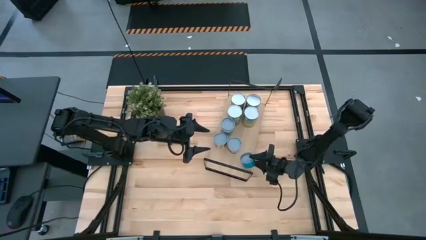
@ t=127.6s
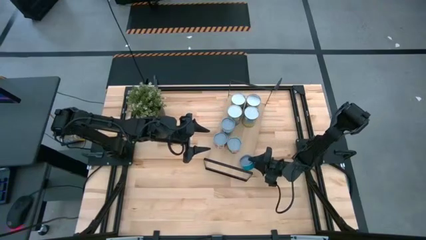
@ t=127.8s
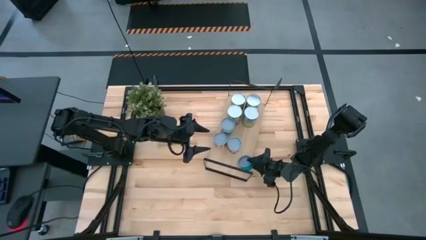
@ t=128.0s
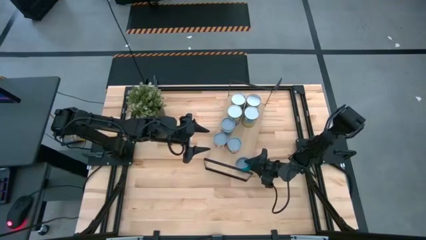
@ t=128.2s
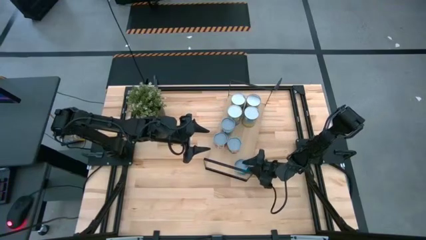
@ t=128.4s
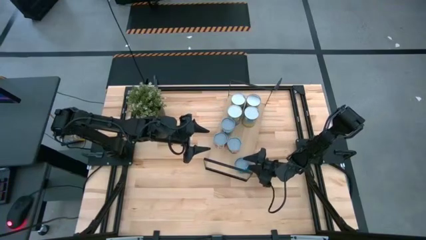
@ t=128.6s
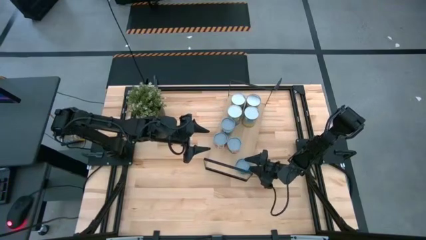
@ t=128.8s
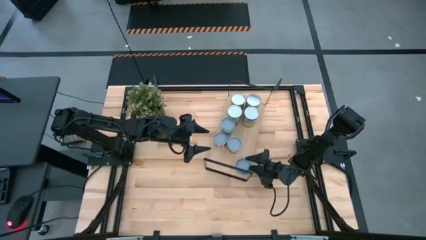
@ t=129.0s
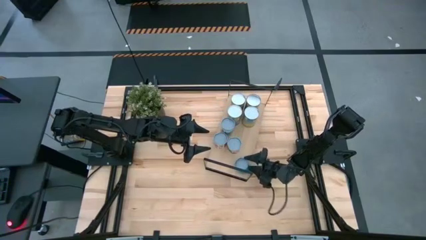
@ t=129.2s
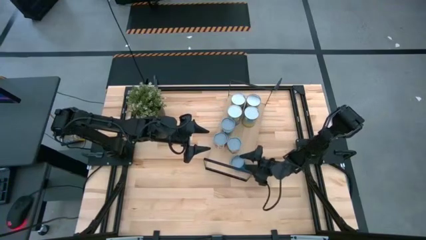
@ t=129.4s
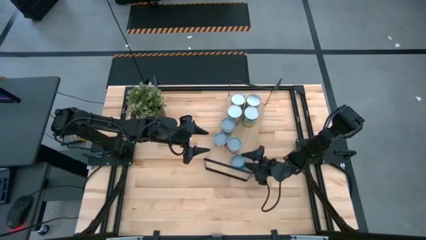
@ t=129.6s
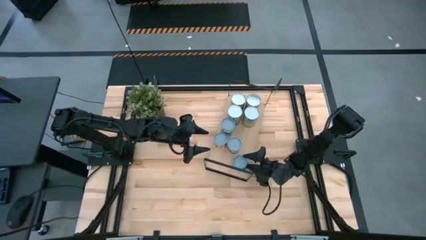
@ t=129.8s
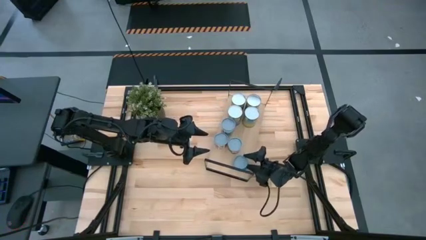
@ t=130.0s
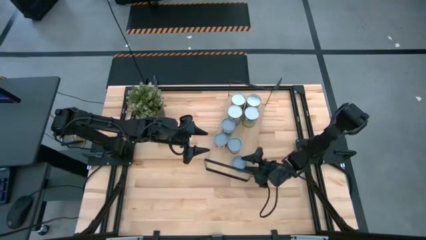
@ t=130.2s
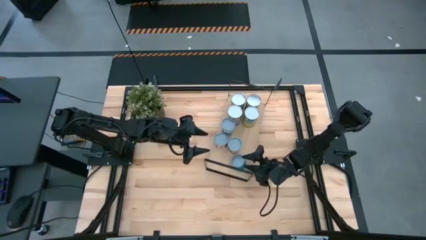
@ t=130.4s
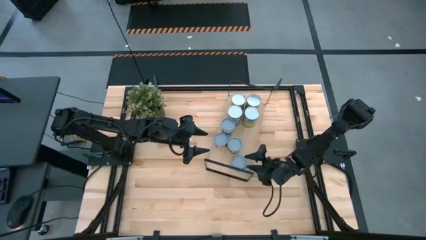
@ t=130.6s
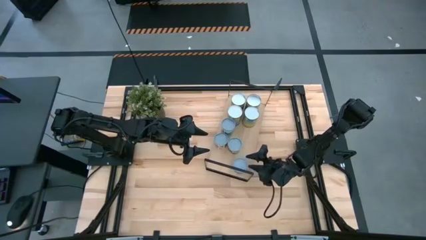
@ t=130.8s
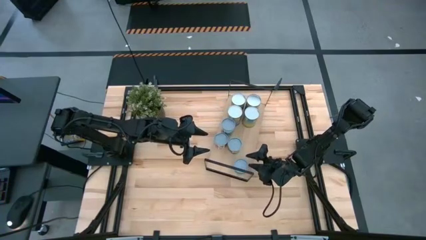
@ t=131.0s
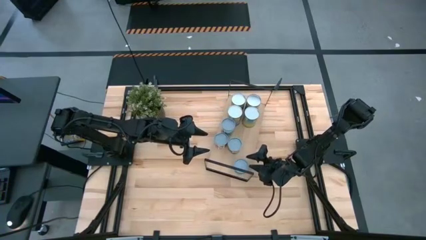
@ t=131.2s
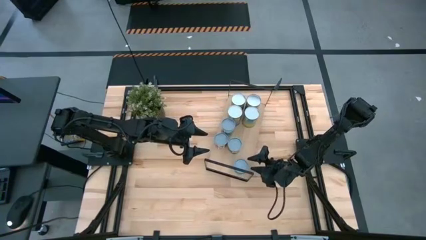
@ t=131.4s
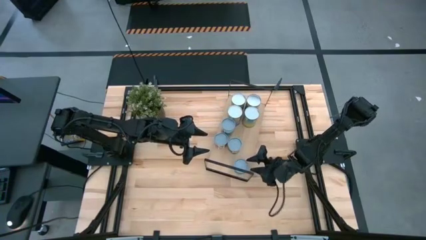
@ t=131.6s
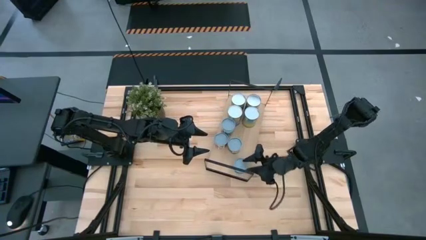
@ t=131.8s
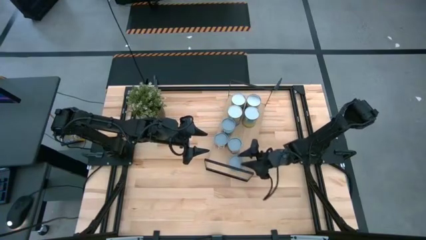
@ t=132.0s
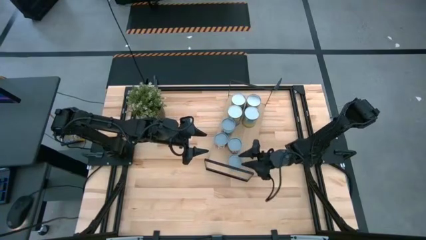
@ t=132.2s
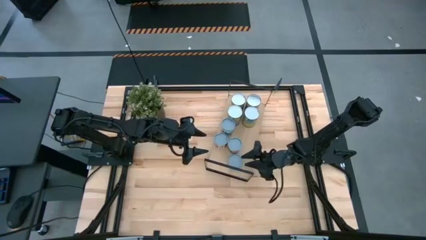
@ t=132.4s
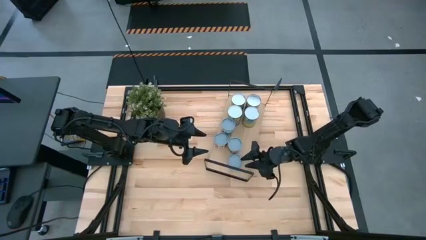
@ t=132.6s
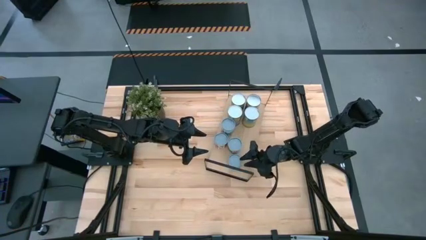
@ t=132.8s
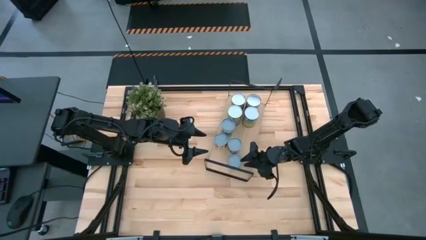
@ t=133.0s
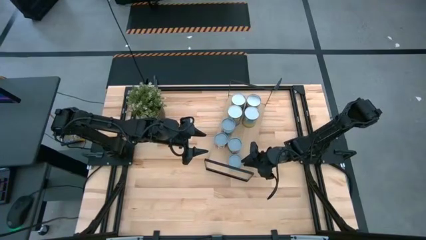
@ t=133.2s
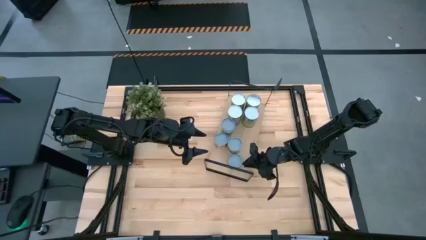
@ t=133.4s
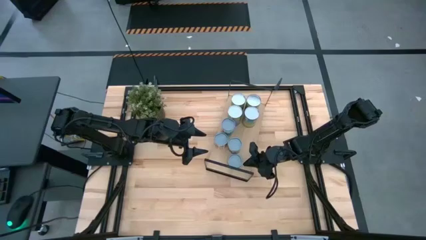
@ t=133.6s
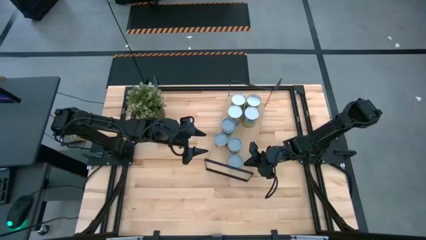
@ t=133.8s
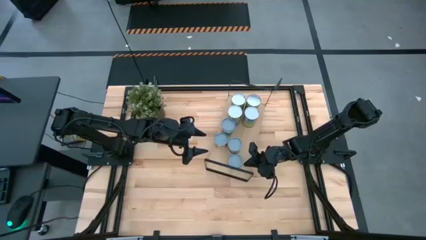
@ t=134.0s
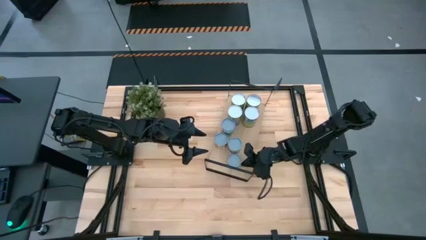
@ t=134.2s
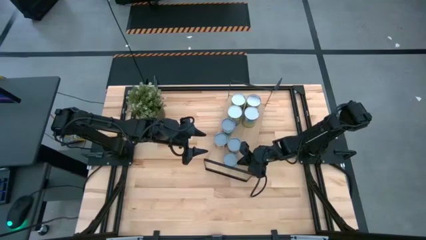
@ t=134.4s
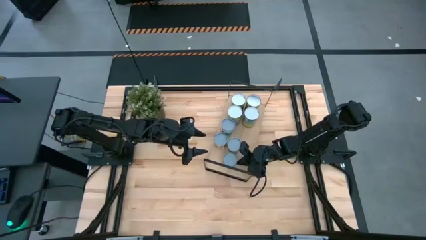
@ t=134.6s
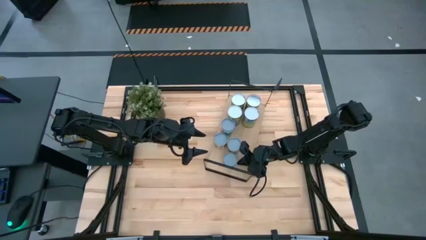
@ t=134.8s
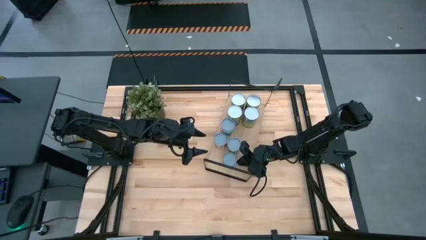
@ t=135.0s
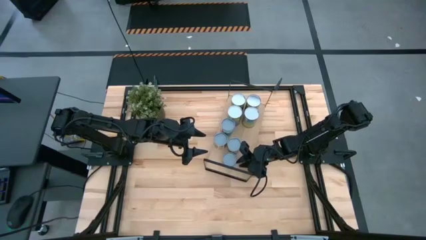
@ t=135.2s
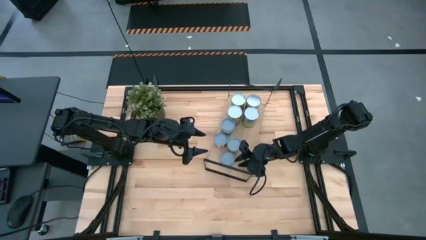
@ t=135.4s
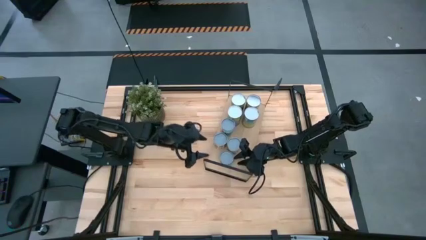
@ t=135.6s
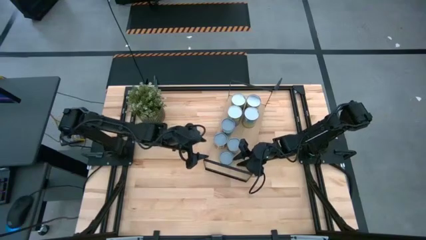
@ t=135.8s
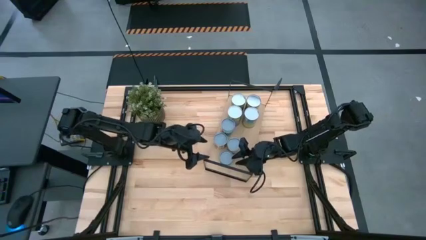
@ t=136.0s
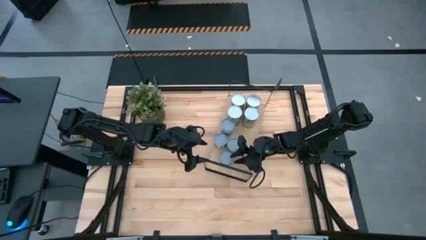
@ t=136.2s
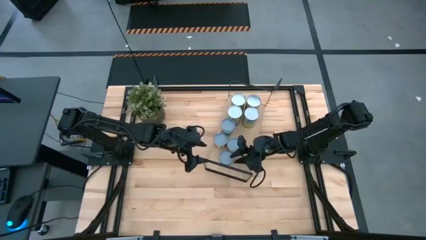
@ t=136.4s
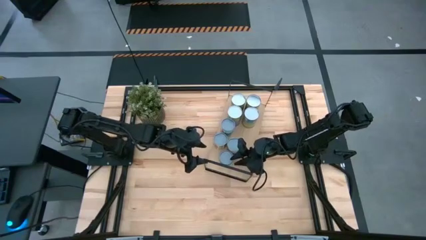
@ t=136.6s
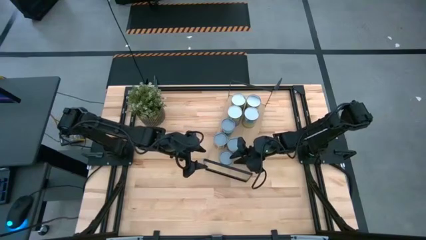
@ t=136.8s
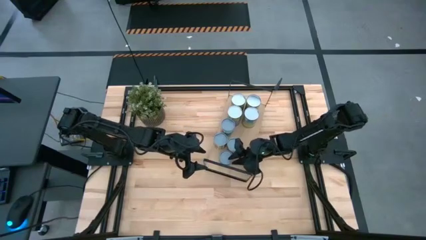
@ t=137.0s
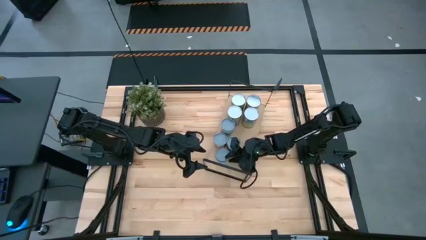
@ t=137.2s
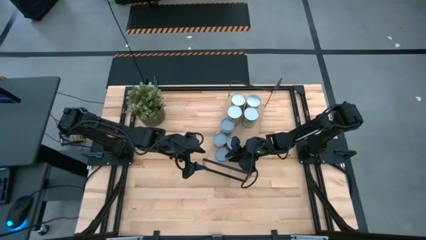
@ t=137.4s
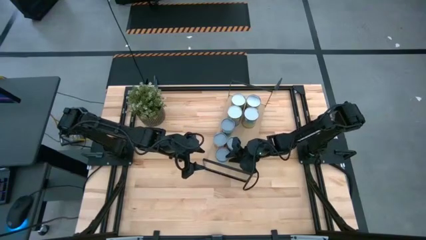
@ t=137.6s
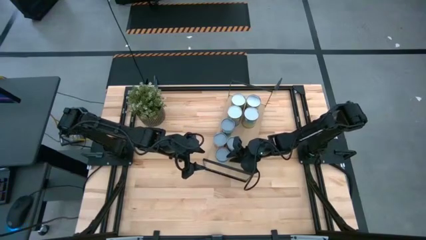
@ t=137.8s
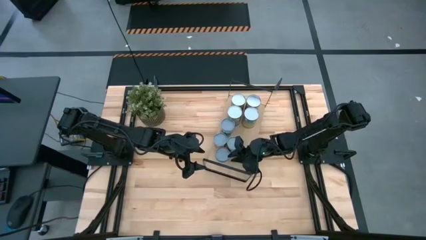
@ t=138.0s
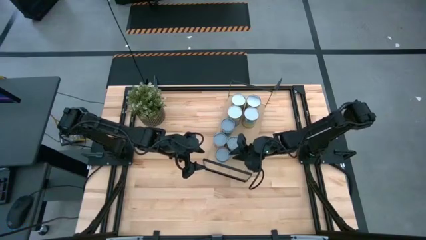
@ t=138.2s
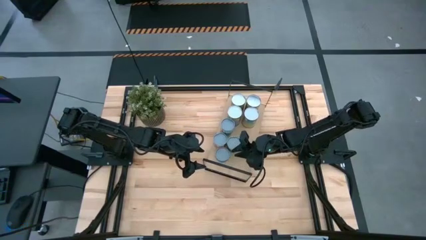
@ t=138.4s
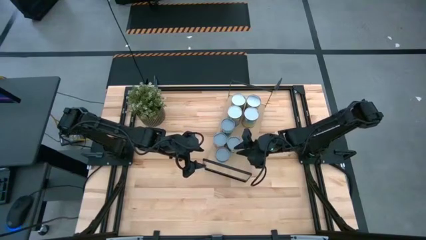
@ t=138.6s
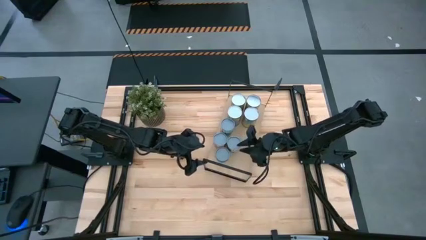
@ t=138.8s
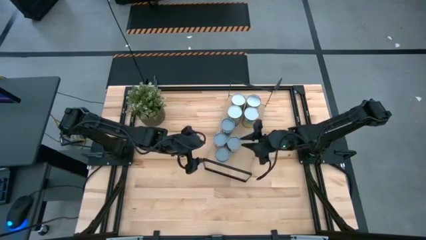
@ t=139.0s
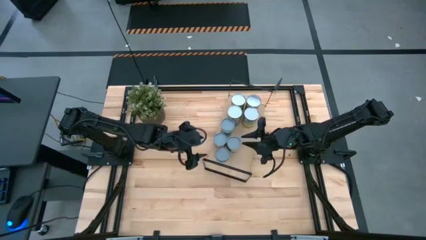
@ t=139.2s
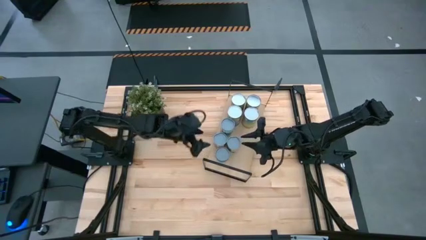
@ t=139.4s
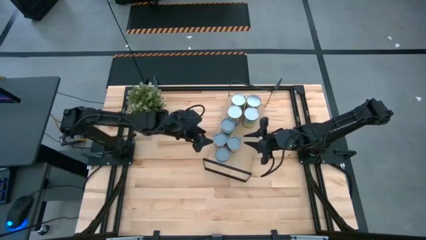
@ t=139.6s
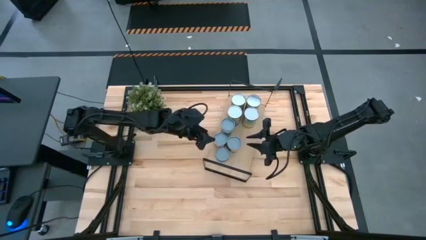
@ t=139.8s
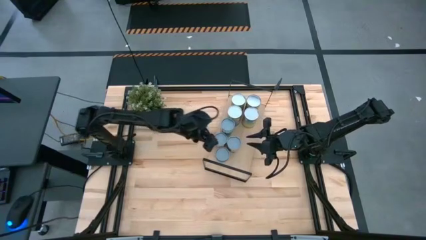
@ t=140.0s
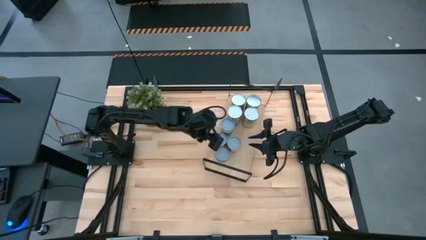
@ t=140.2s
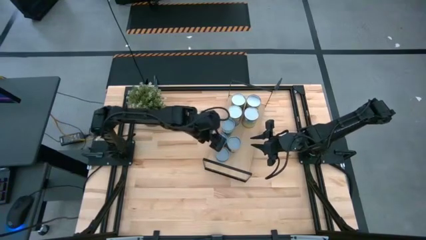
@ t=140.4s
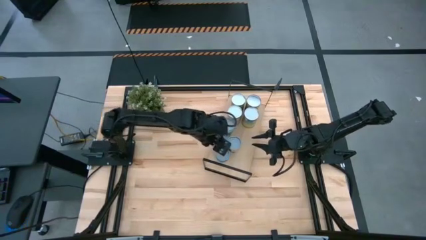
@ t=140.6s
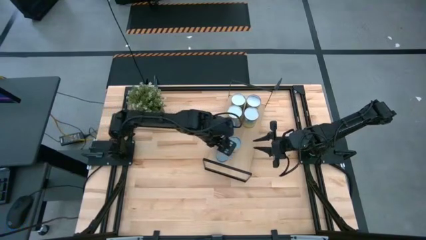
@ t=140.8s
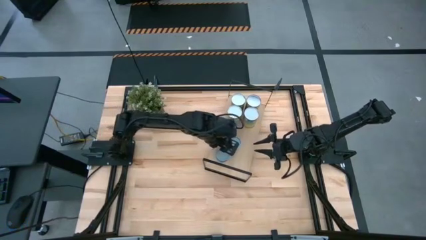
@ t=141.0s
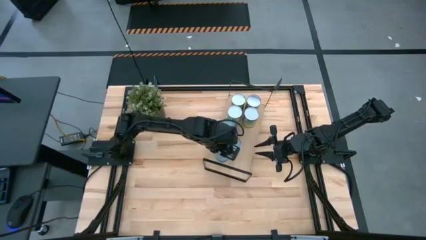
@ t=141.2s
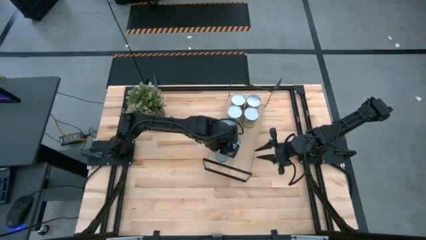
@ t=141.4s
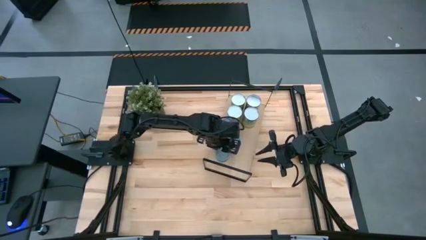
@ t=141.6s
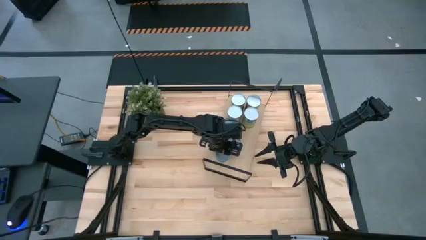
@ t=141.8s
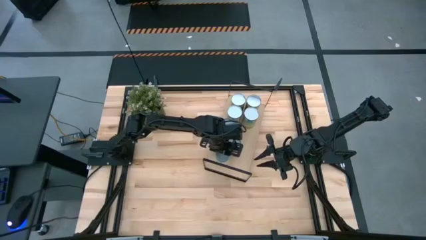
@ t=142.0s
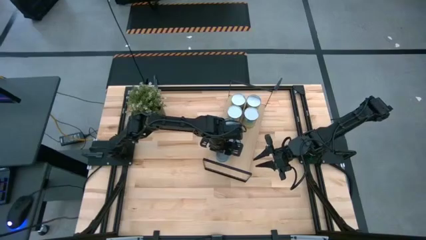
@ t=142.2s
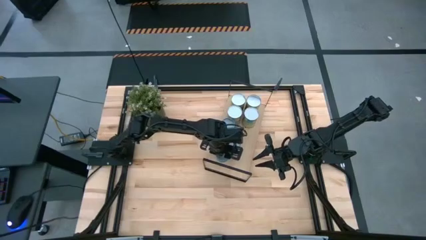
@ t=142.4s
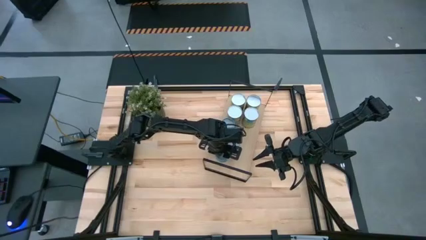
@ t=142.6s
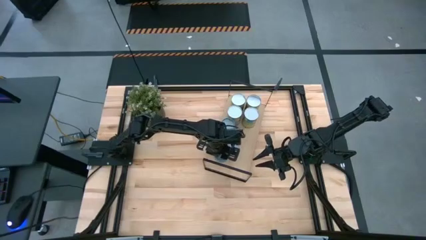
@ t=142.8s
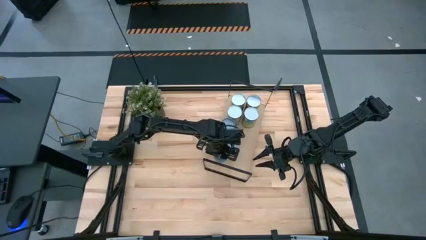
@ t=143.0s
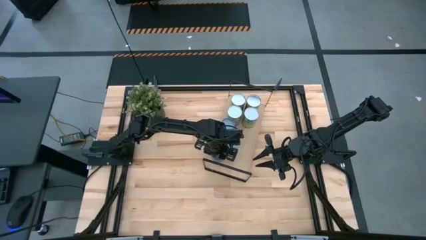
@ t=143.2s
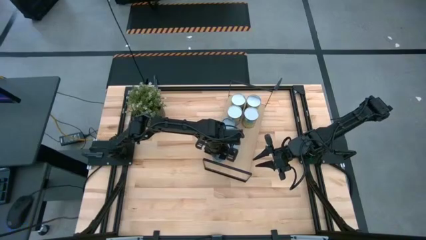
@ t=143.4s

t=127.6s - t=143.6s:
Task: Pick and place cans onto a shelf
Put the canned tuna fish on the shelf
